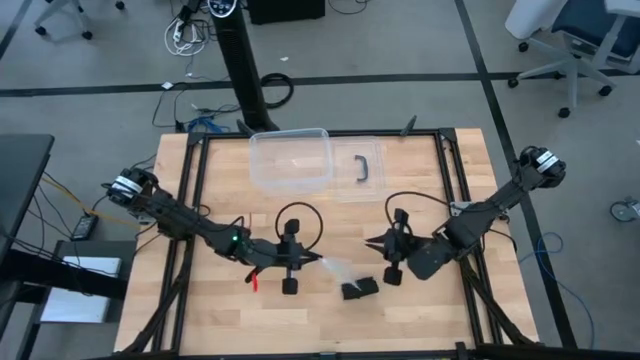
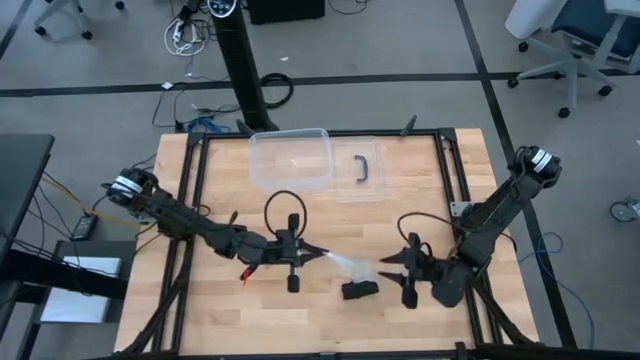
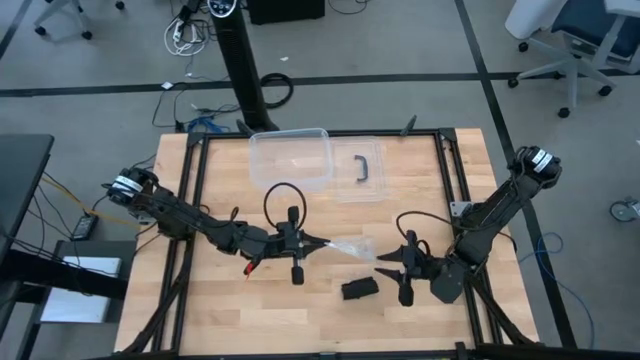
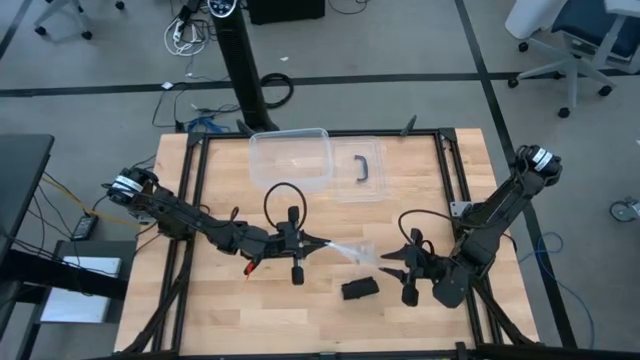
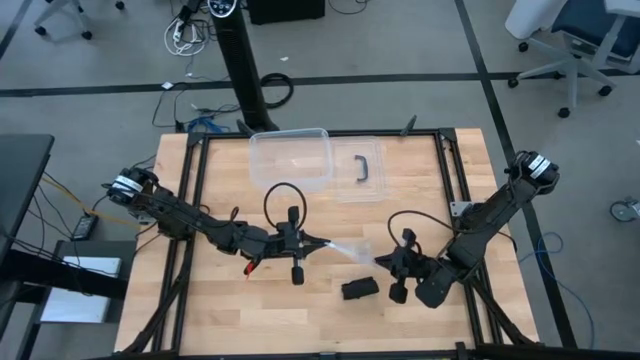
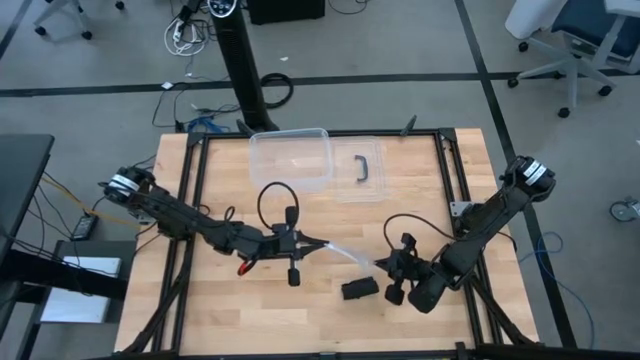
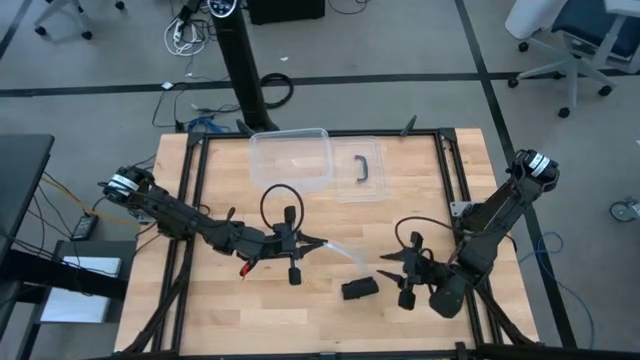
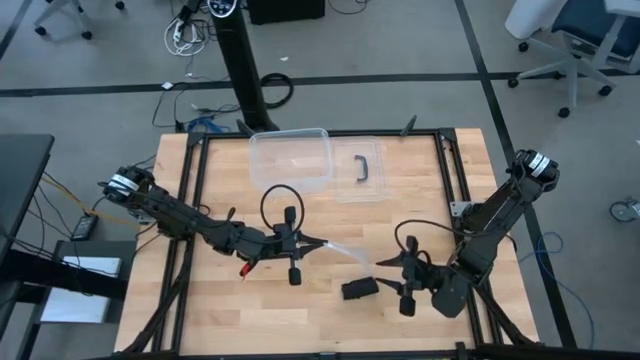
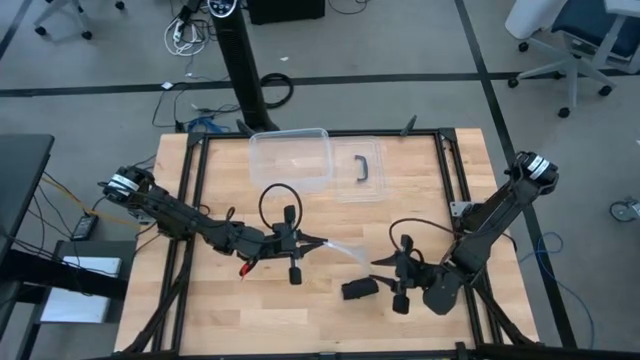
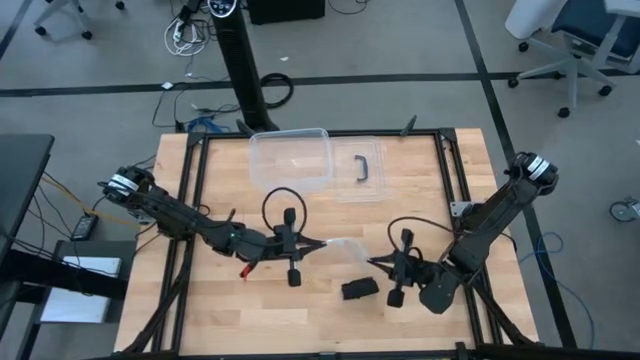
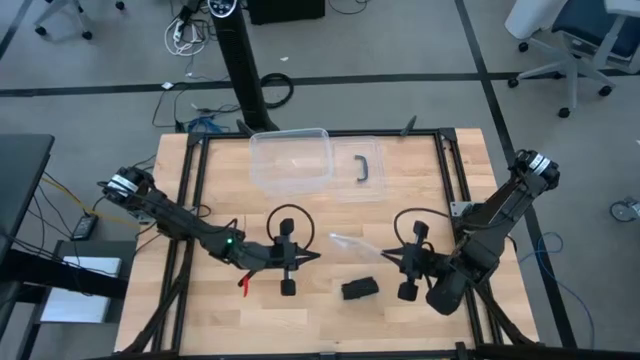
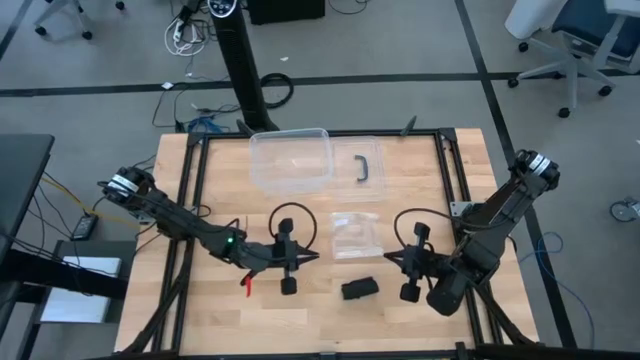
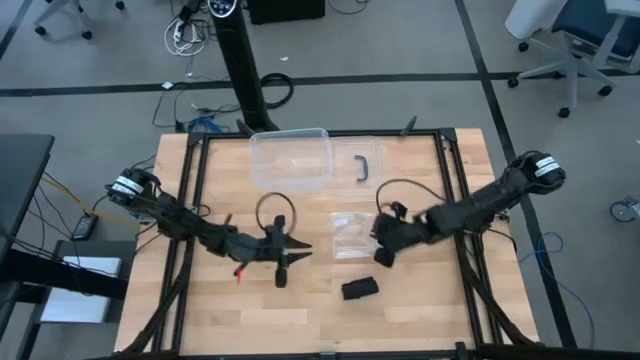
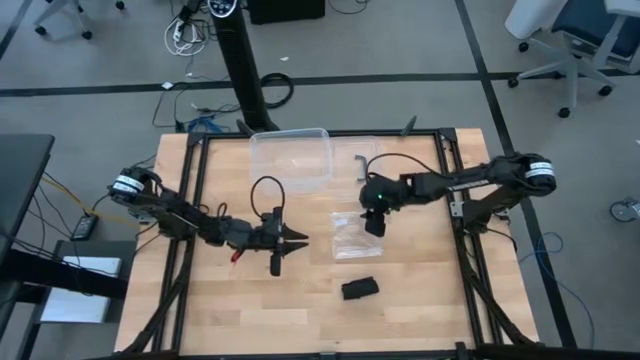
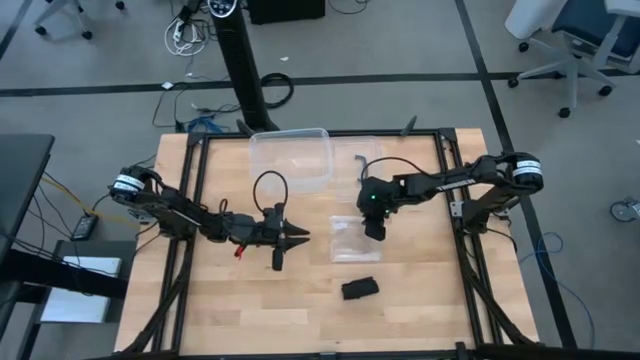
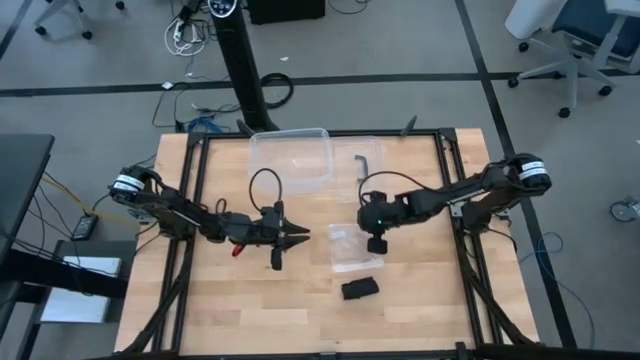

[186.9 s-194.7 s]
Task: Roll bandage
Open the transparent zip bag

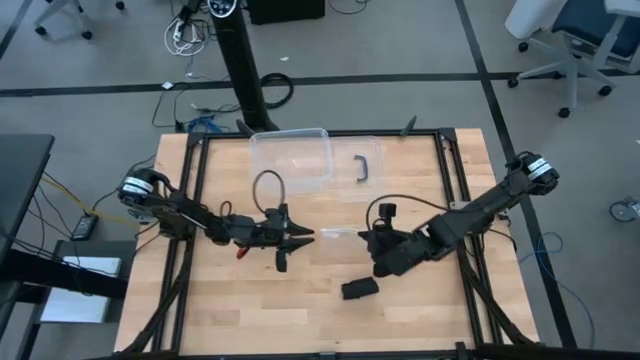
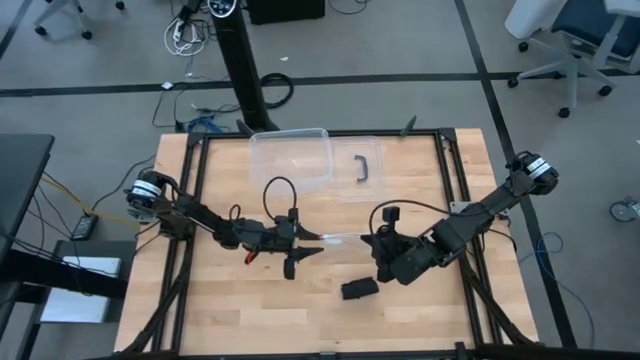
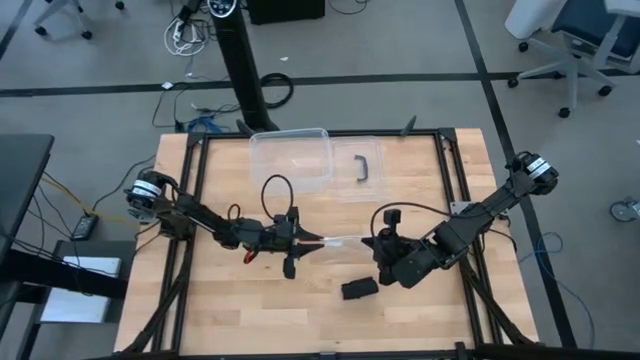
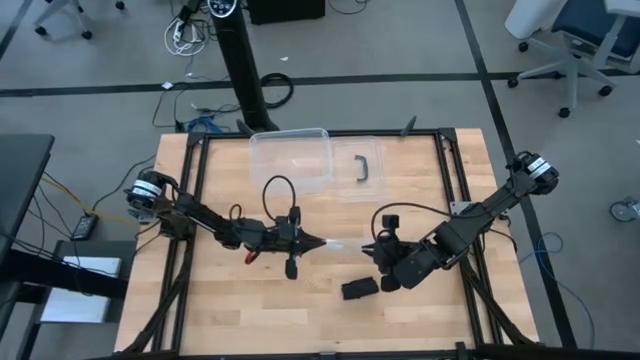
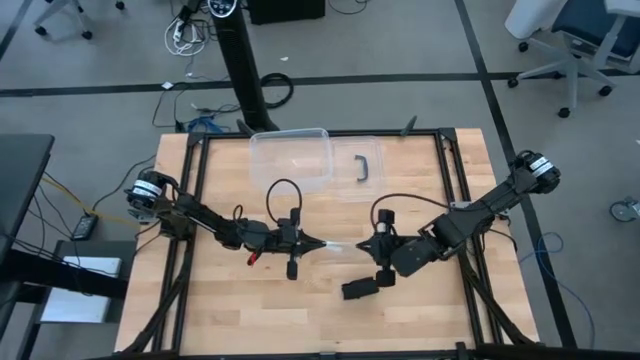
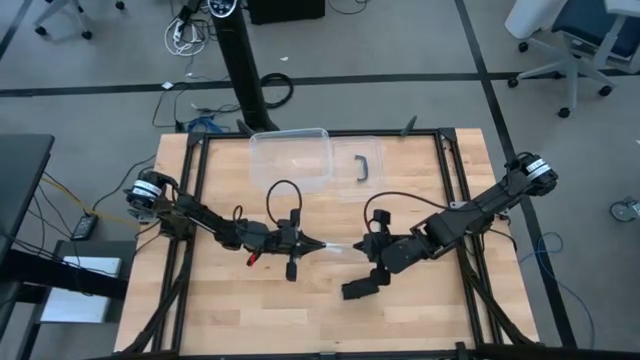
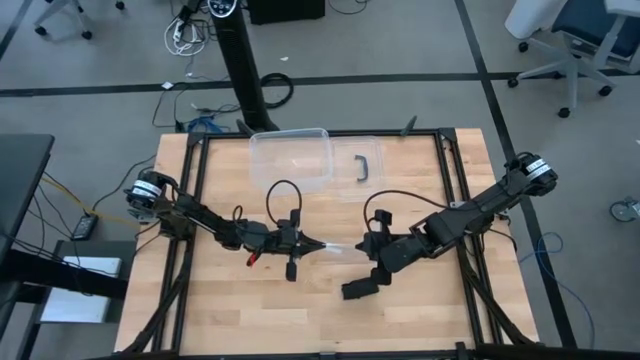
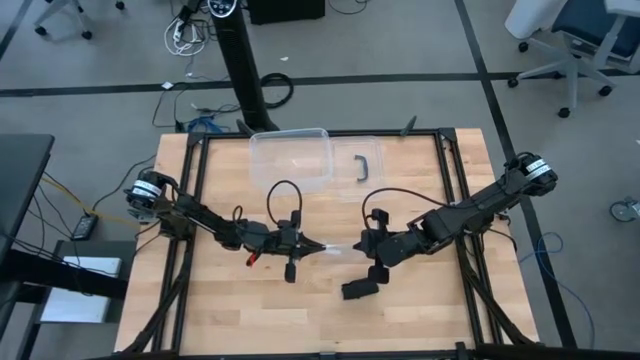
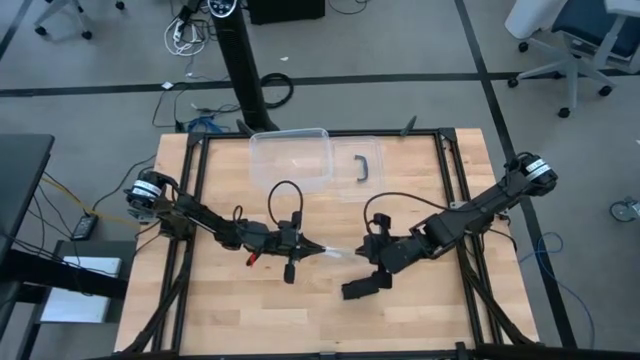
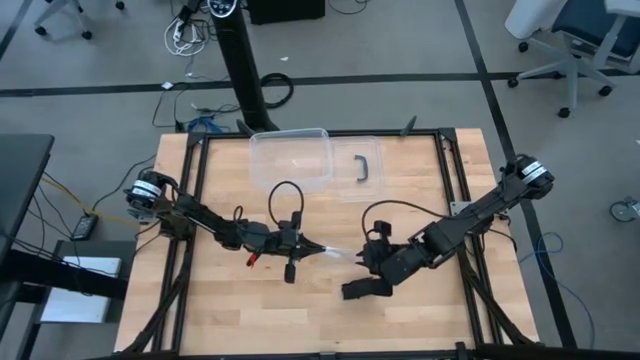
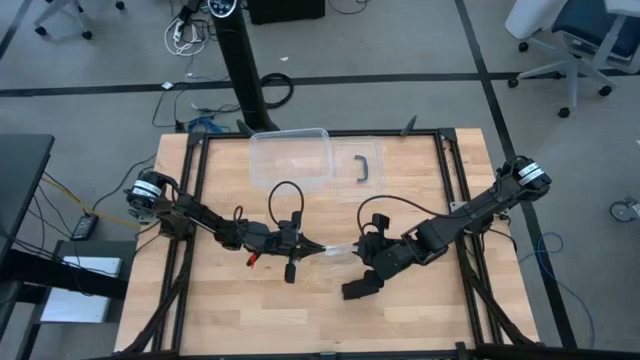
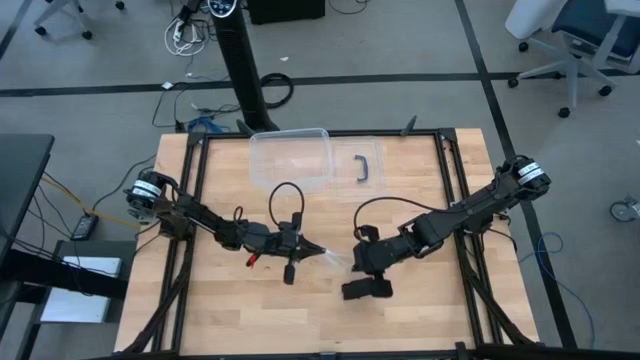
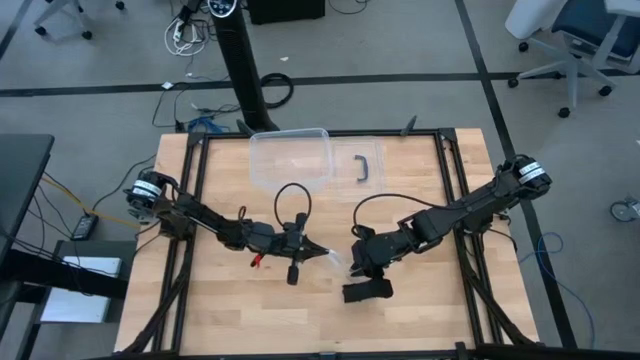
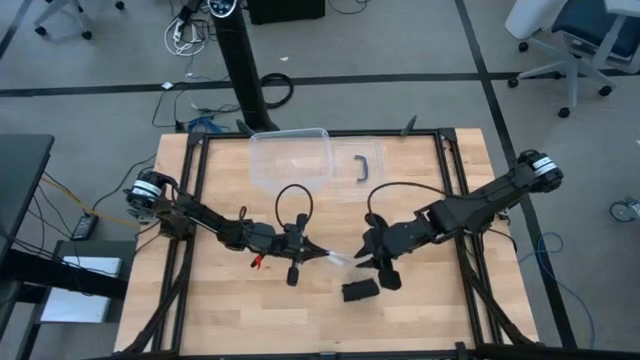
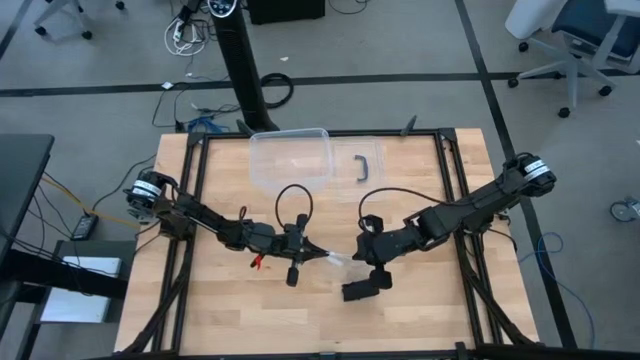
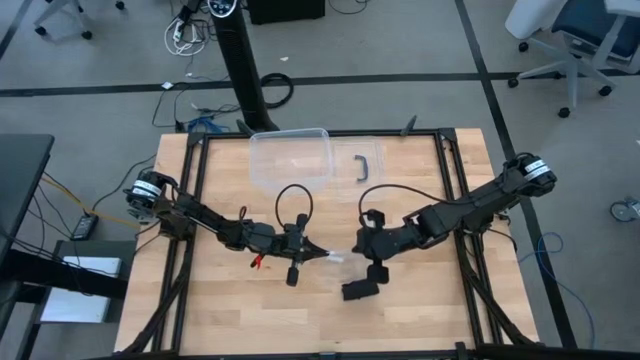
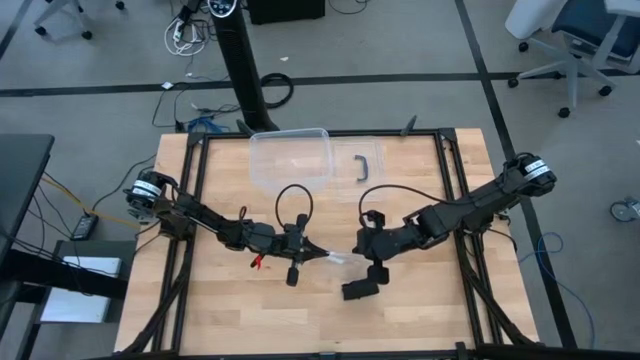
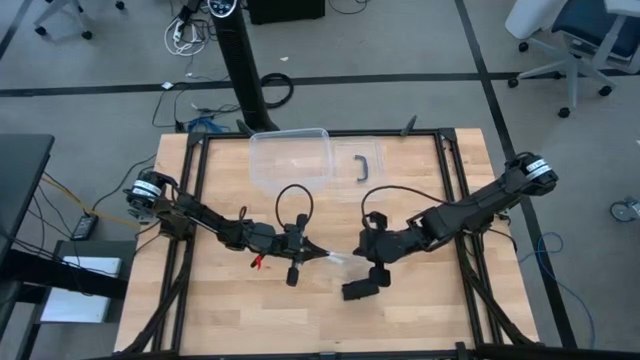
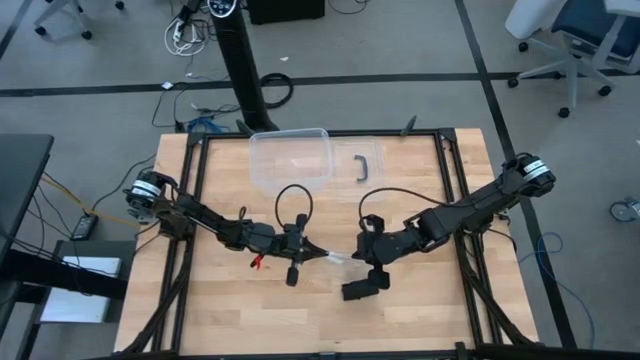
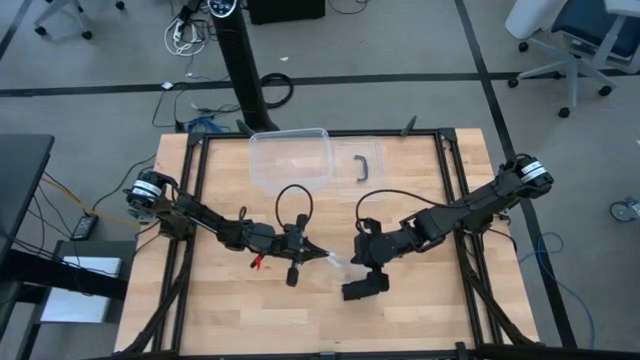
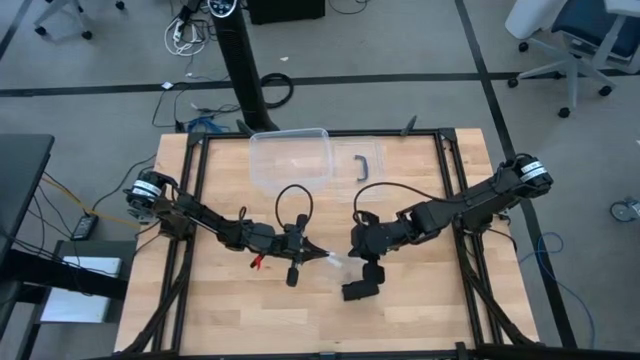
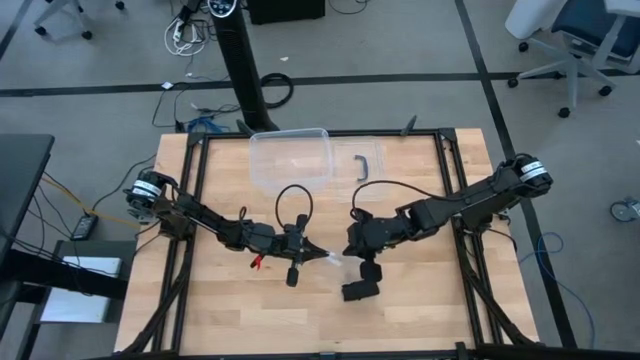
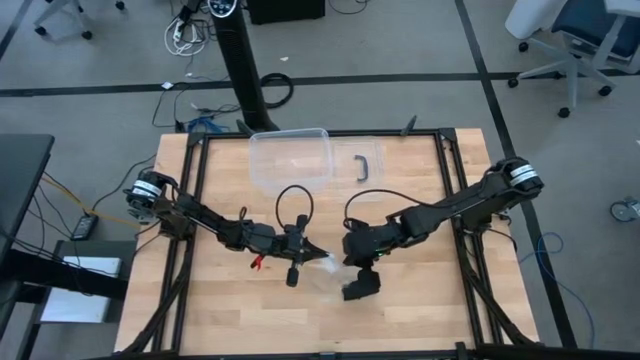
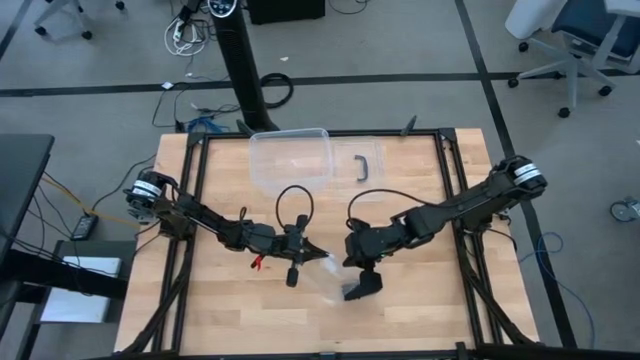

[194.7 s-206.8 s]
Open the transparent zip bag

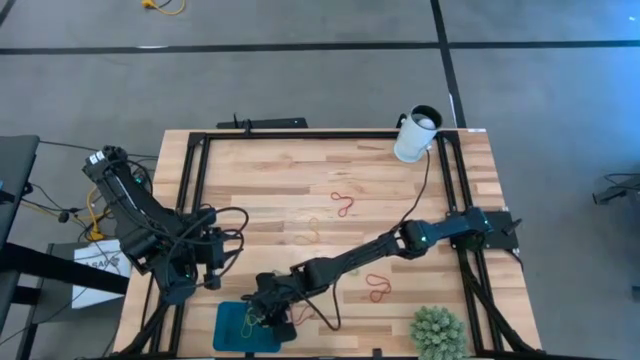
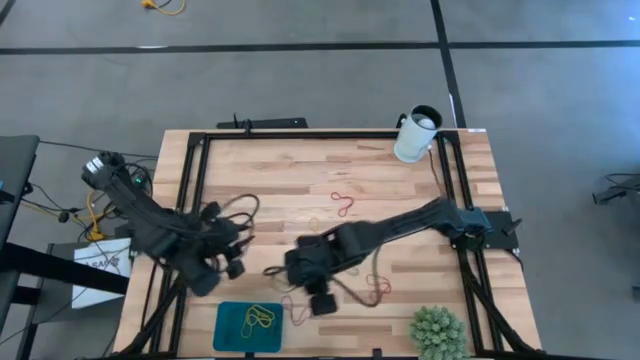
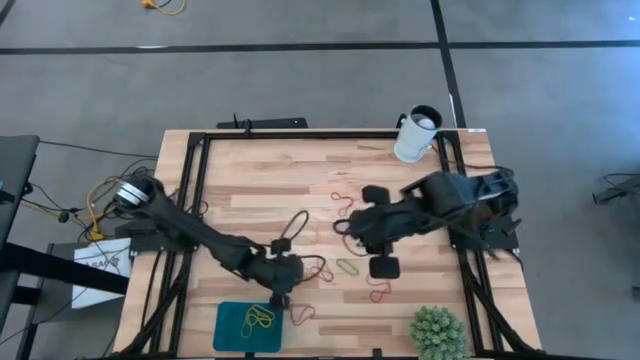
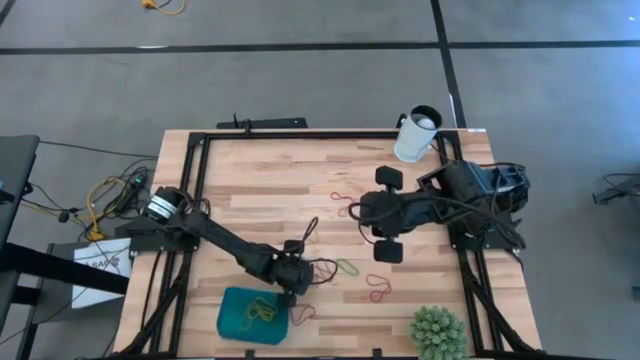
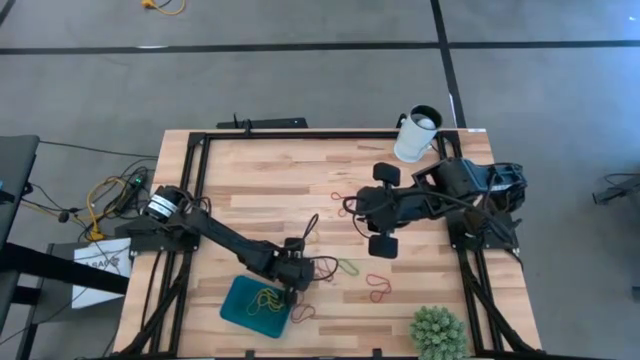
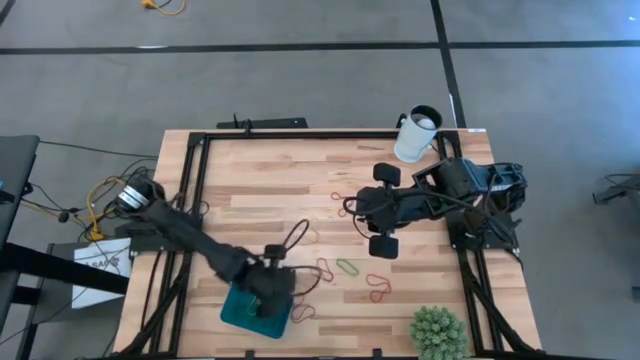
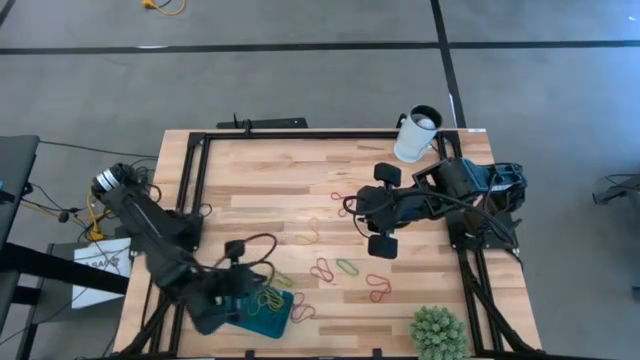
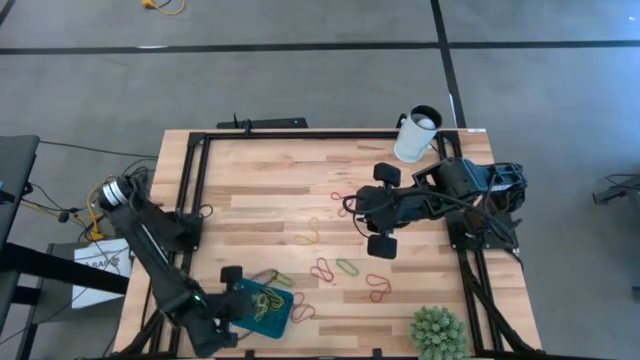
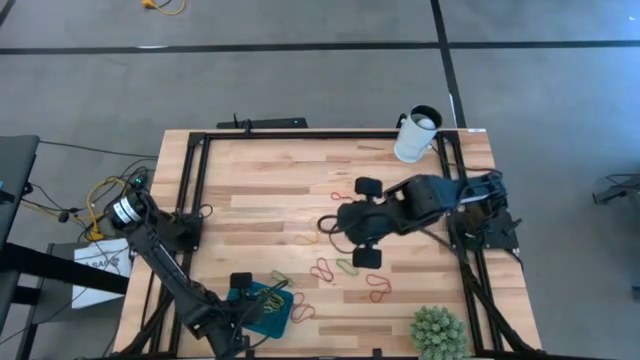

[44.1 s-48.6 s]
Task: Pick and place items into bin
Put the yellow rubber band into the blue bin
